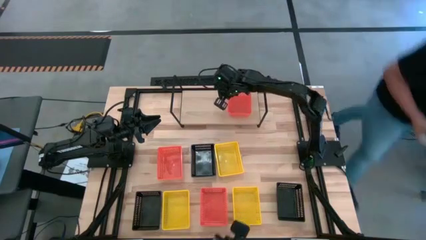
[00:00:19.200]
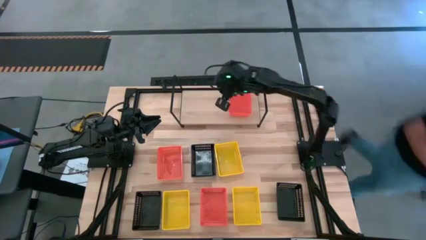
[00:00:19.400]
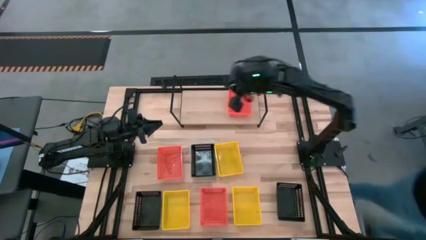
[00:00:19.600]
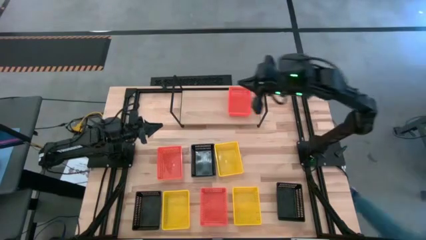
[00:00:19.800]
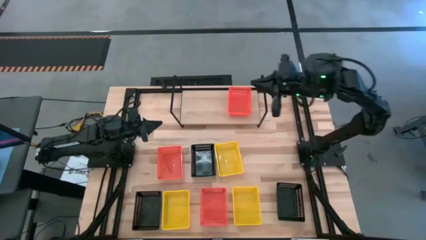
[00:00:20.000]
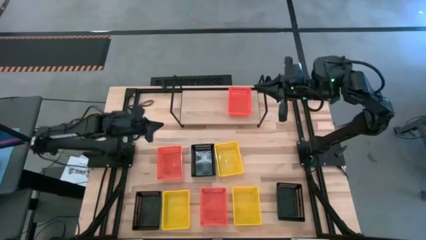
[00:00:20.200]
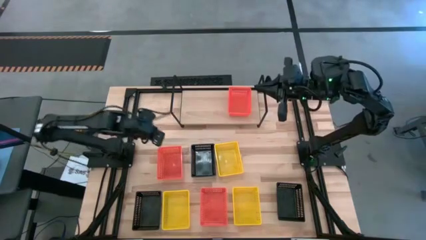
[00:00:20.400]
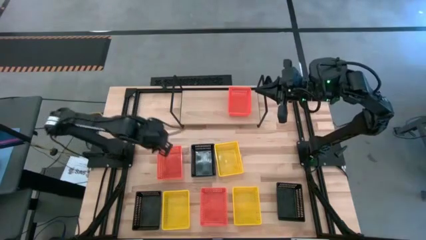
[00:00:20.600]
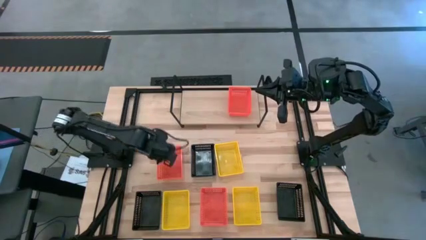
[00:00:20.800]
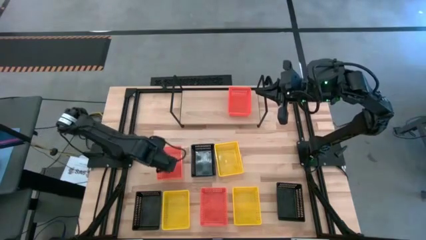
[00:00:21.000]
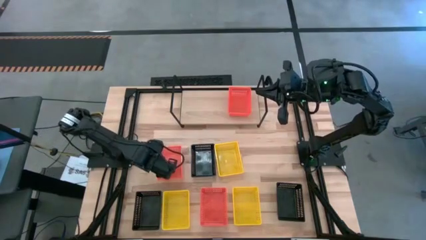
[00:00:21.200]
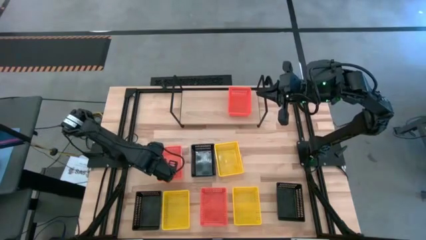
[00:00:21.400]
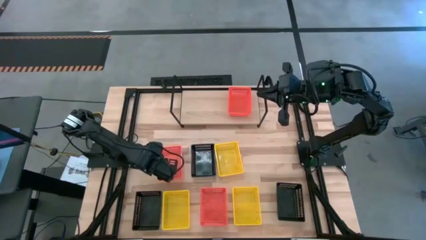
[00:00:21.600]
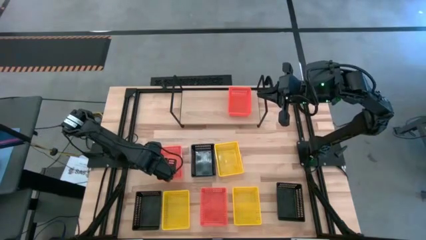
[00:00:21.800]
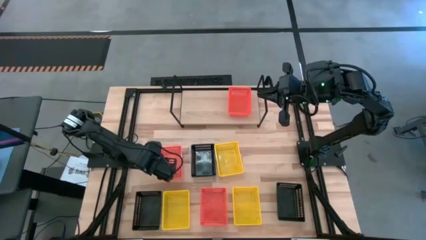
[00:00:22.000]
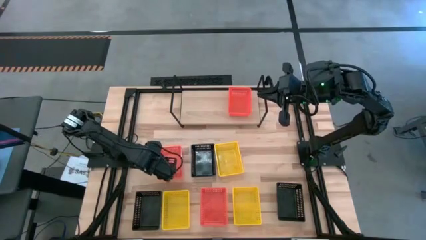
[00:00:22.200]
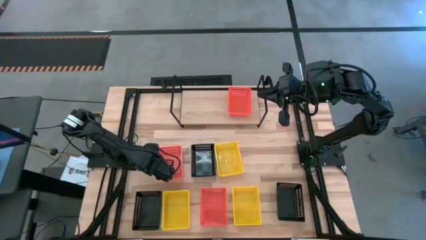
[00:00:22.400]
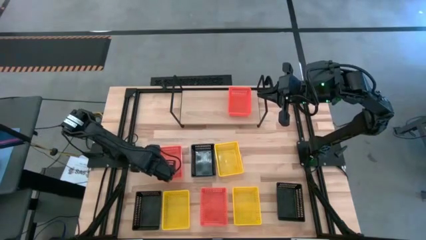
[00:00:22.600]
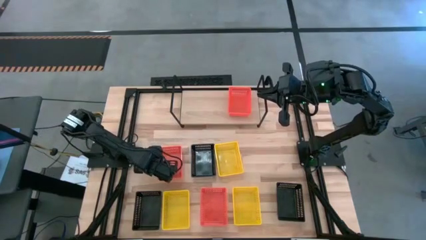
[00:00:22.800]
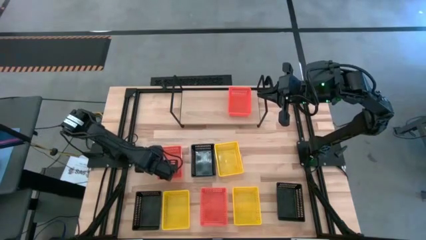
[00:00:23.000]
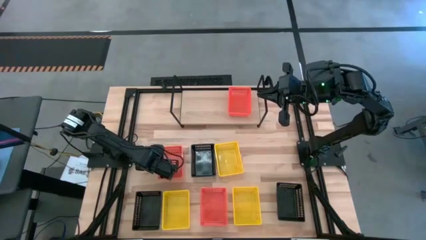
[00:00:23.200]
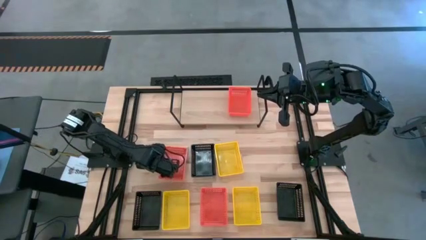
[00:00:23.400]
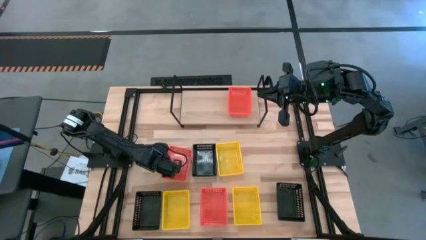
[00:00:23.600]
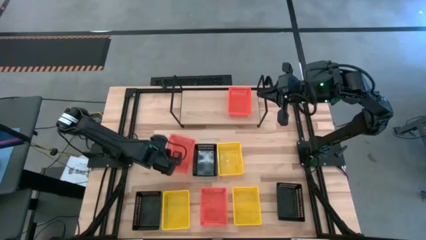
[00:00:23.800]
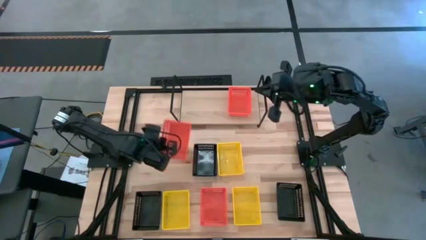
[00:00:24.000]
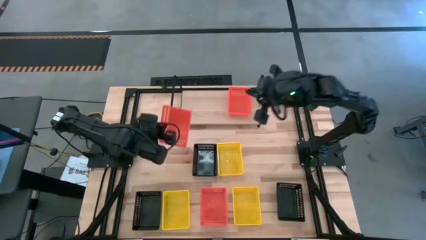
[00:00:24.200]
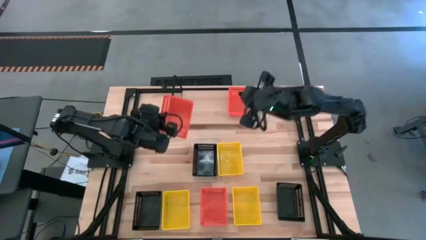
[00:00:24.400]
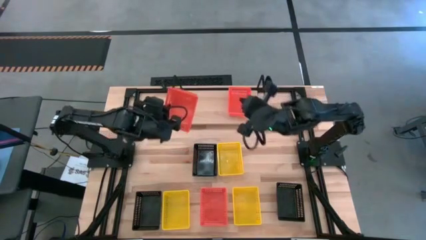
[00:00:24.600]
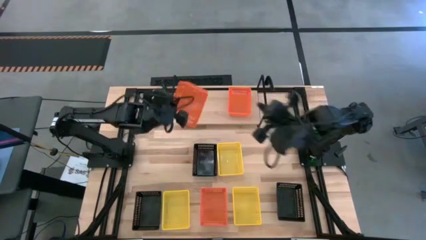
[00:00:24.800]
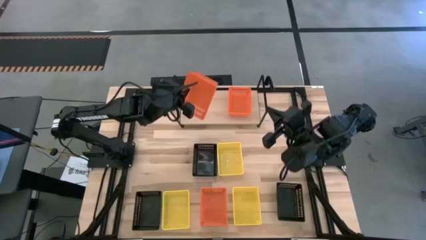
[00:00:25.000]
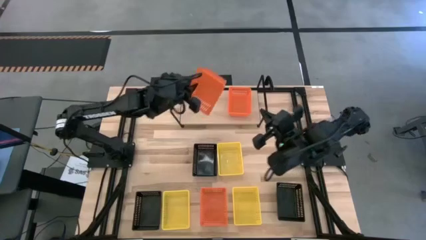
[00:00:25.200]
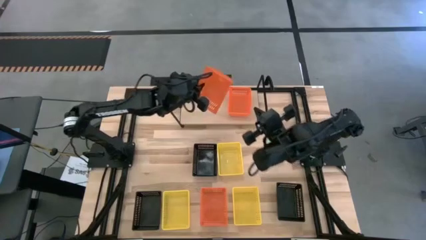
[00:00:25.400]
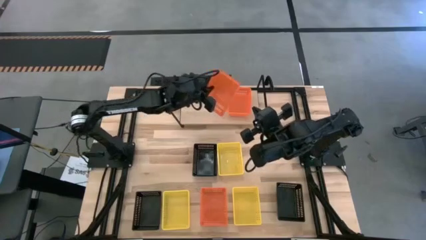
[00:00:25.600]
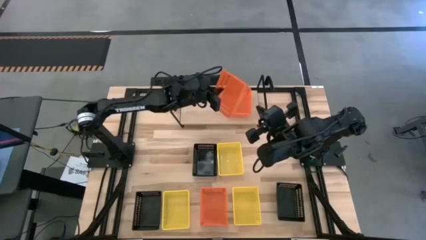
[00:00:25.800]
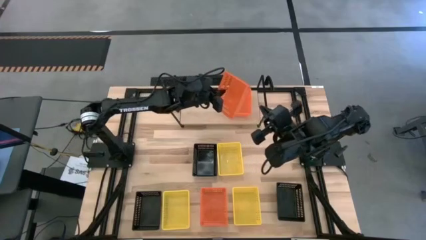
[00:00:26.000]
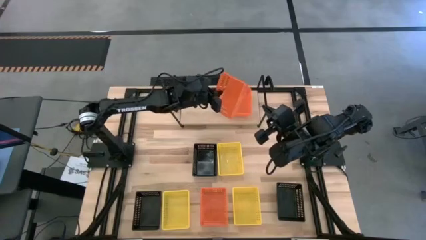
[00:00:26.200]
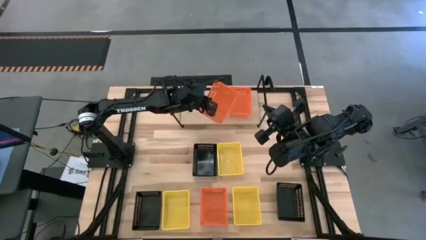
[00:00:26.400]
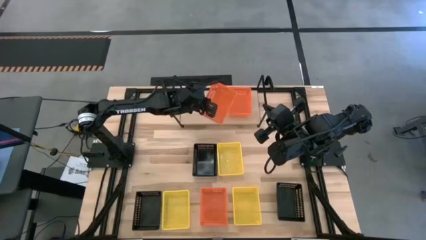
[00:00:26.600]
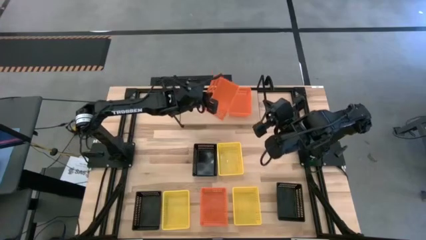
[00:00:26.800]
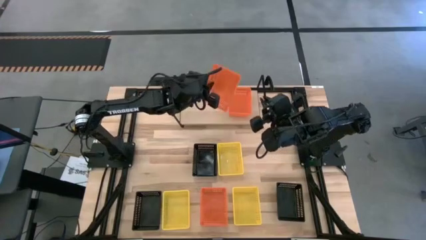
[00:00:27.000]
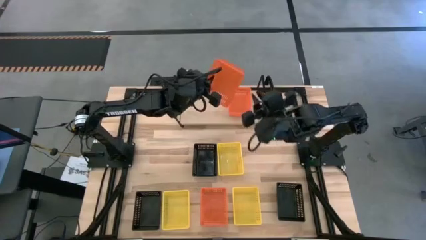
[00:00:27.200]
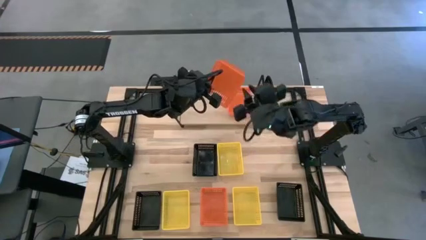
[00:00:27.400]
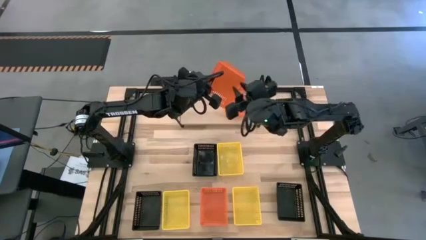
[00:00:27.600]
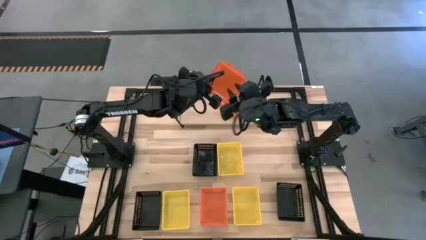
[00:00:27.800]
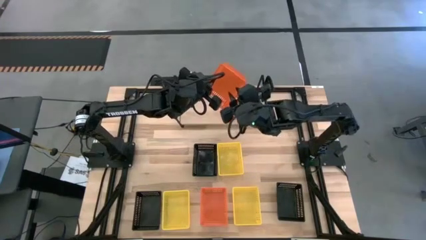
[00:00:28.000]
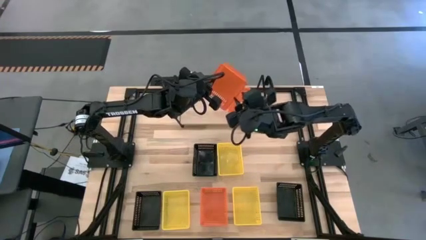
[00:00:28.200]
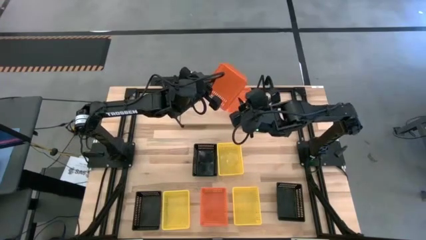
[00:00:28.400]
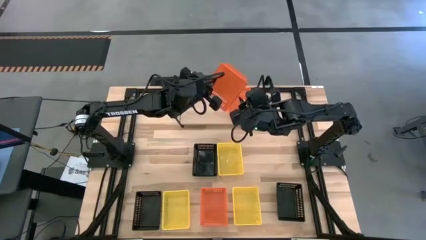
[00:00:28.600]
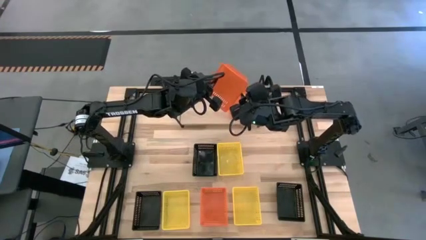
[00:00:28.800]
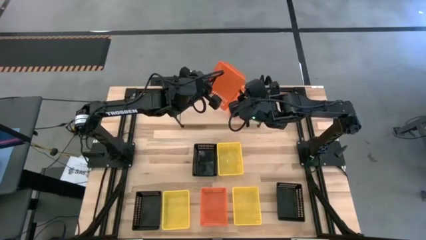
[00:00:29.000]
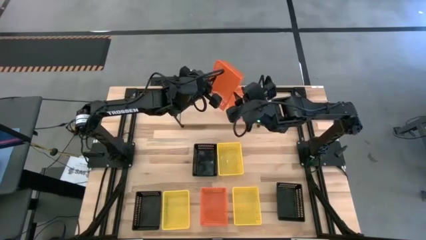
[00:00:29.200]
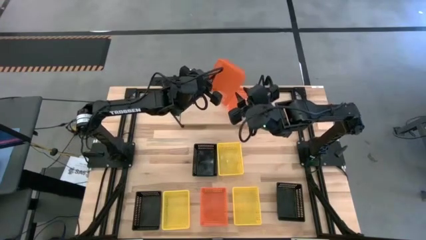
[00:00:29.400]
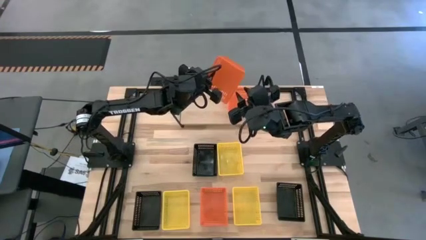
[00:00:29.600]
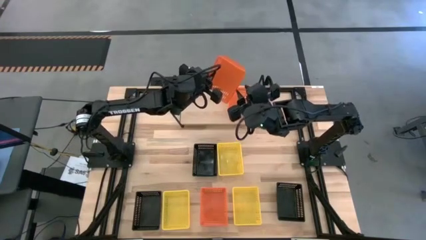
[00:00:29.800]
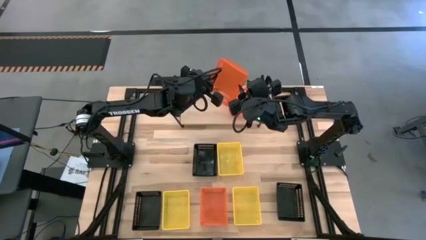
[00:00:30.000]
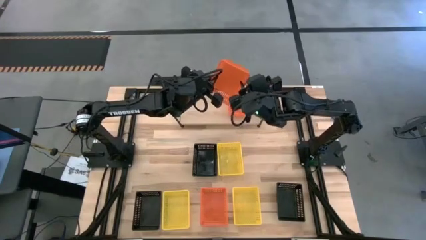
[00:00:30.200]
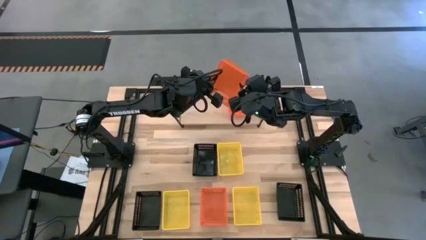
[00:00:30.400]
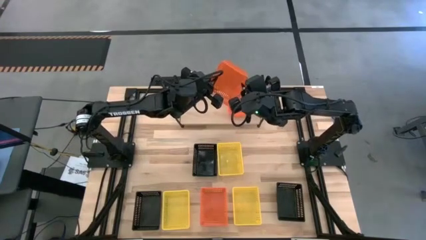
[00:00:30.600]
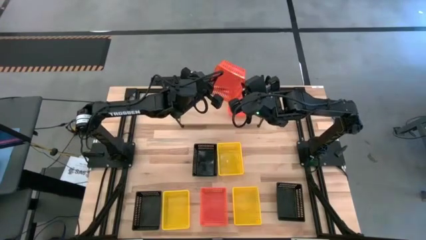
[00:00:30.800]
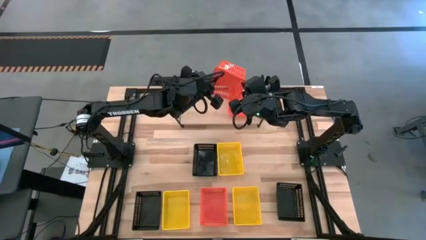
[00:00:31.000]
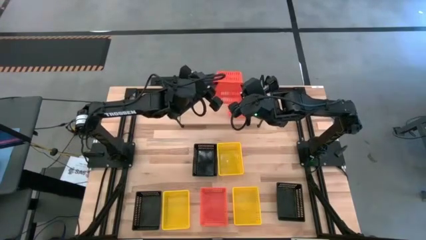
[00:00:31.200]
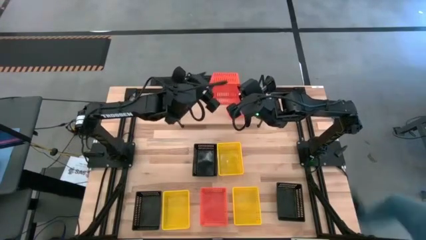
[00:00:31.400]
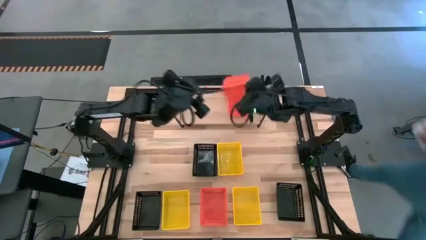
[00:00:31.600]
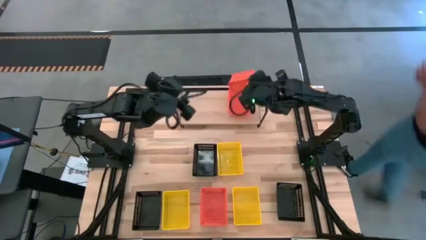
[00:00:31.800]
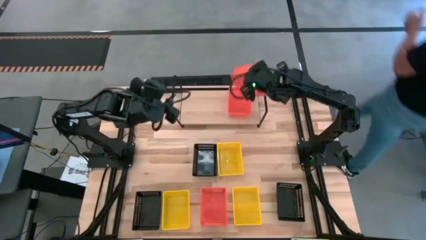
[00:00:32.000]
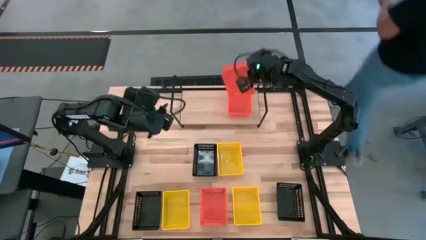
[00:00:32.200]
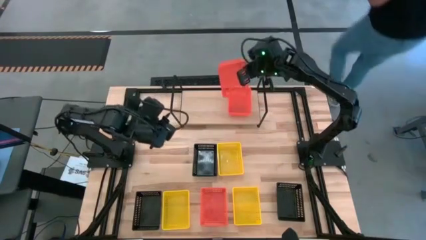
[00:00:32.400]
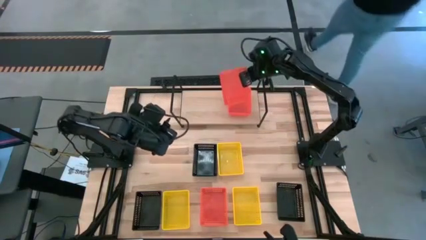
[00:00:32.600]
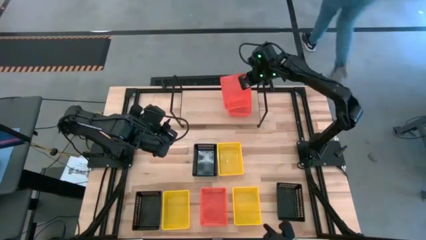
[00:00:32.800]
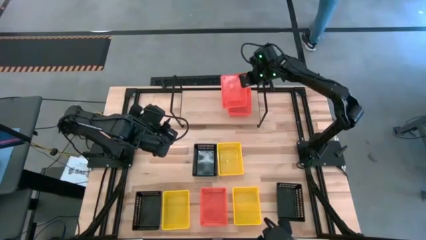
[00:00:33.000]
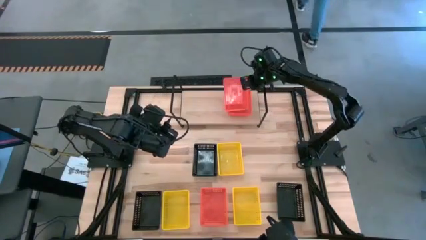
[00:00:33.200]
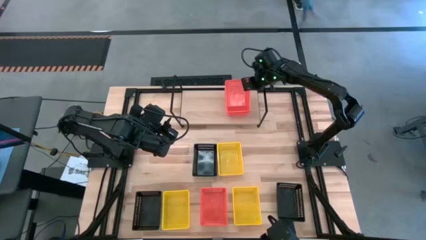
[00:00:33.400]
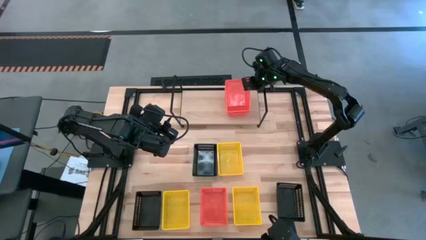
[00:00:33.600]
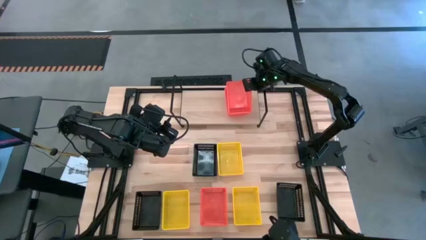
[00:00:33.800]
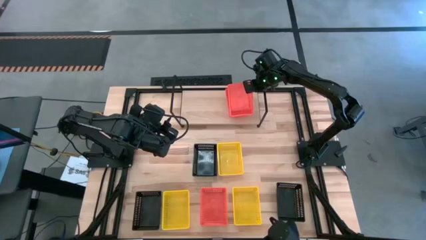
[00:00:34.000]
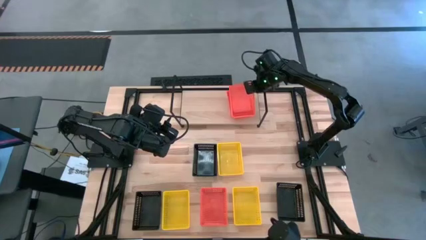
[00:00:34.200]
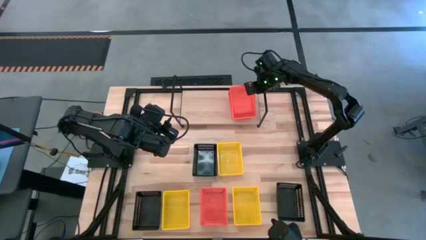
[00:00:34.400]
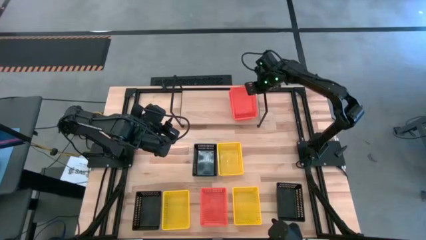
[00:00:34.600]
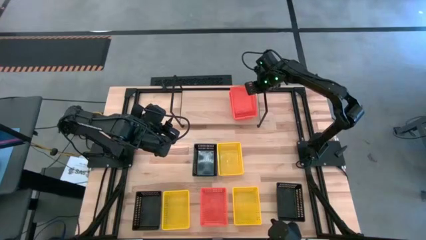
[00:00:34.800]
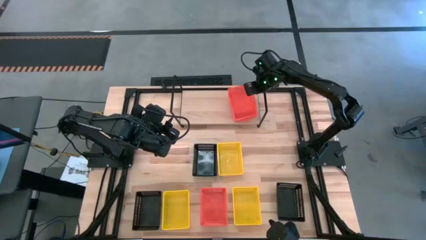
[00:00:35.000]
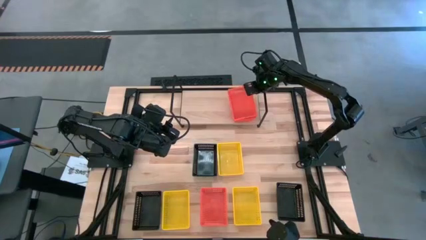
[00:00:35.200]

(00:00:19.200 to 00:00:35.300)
Task: Stack baskets on shelf by color
Stack the top orange bin on top of the other orange bin on the shelf
